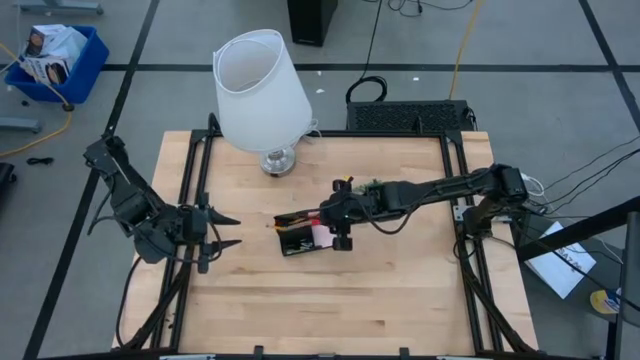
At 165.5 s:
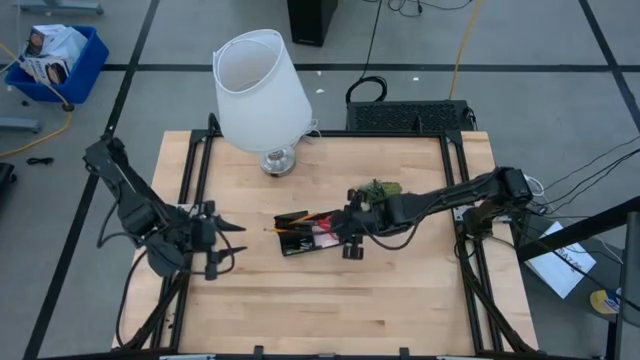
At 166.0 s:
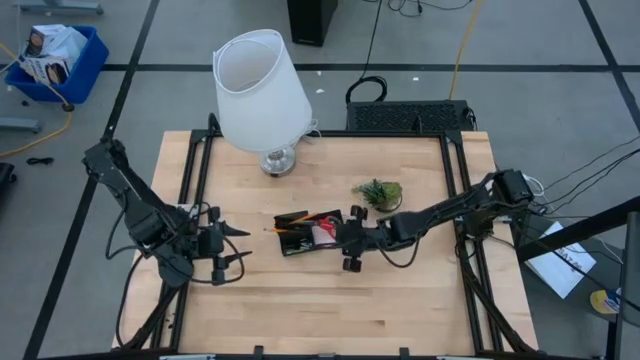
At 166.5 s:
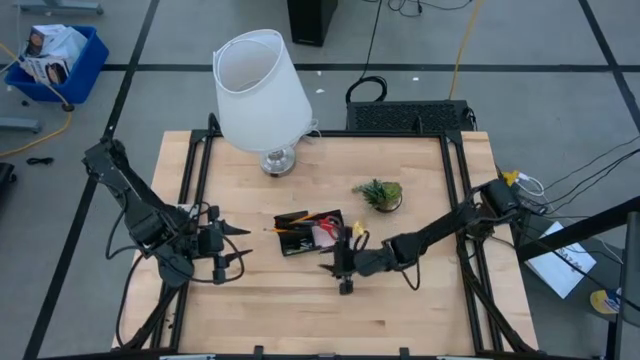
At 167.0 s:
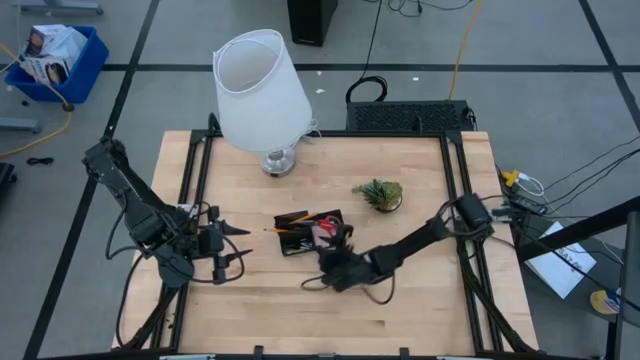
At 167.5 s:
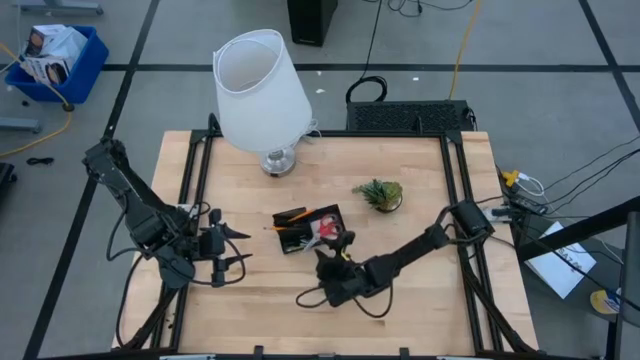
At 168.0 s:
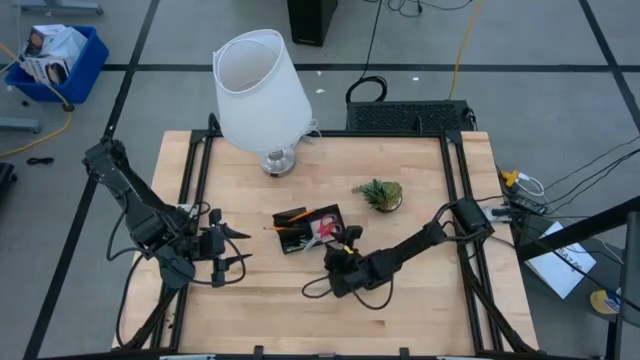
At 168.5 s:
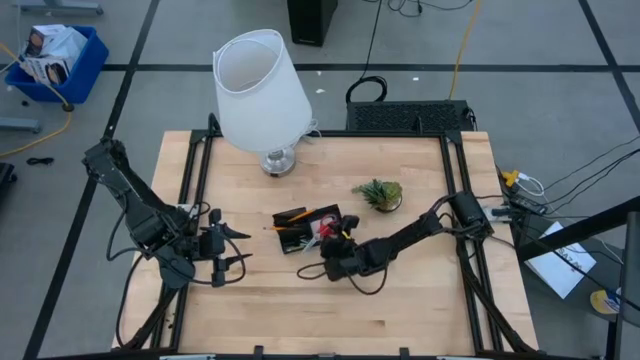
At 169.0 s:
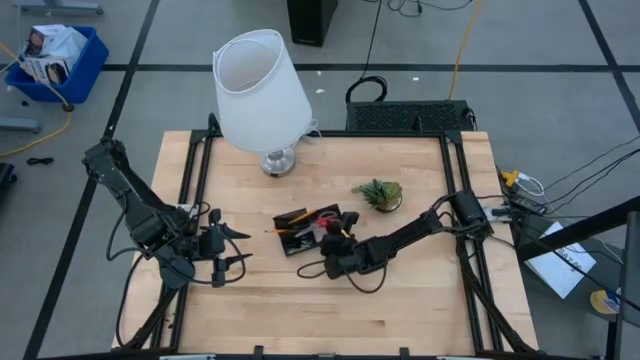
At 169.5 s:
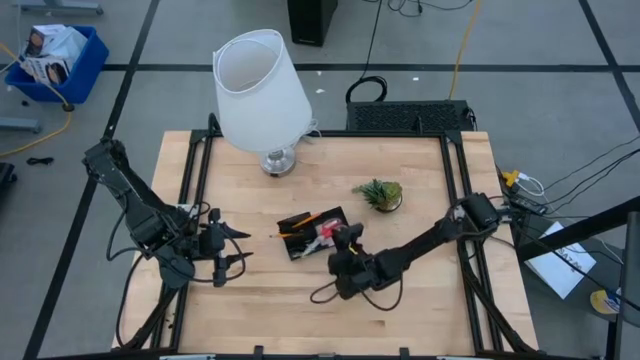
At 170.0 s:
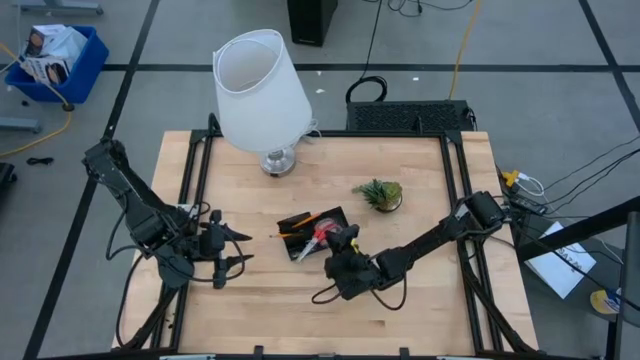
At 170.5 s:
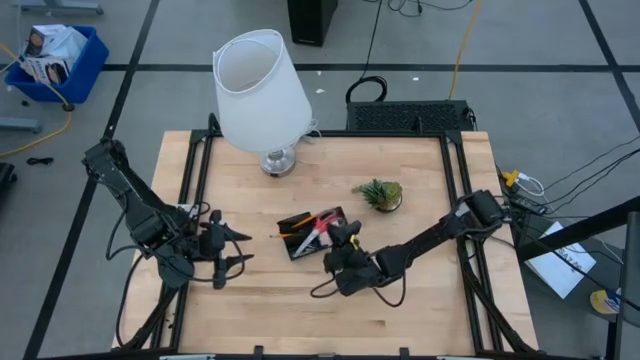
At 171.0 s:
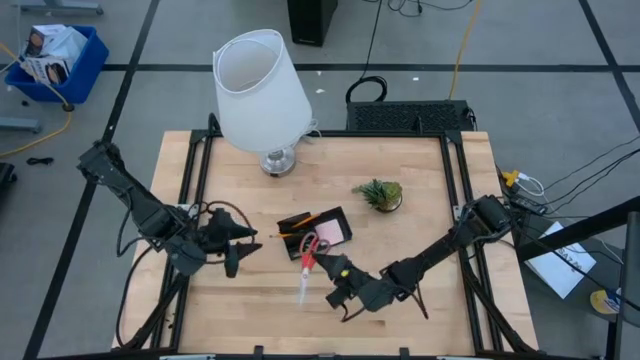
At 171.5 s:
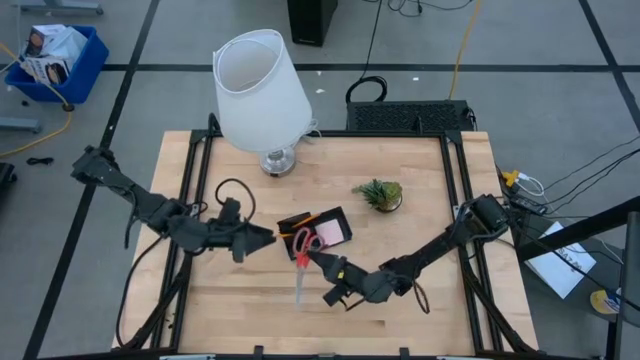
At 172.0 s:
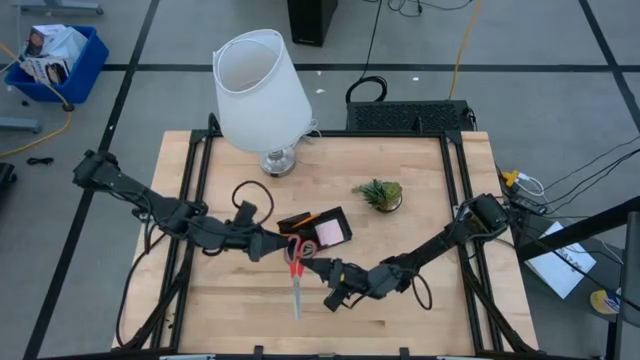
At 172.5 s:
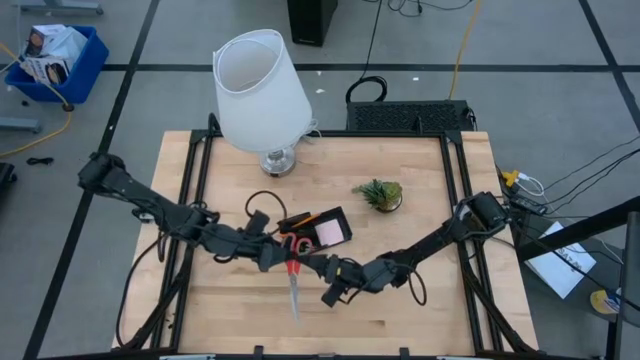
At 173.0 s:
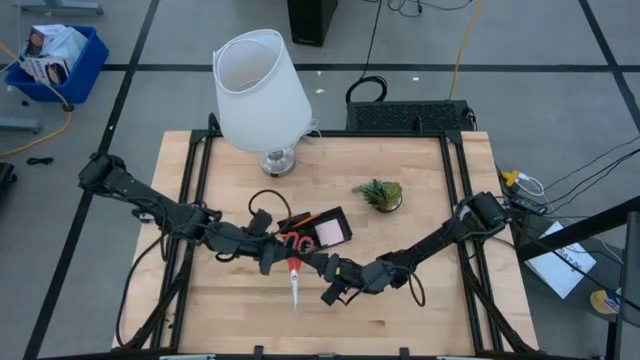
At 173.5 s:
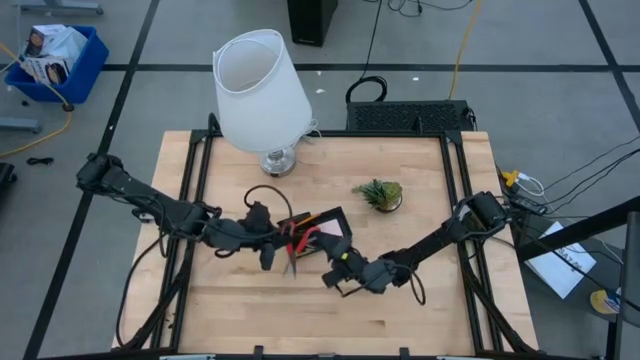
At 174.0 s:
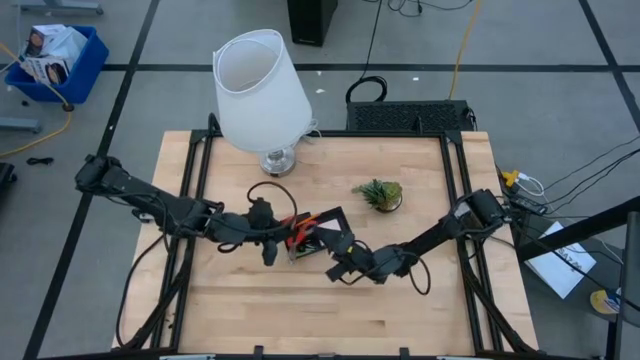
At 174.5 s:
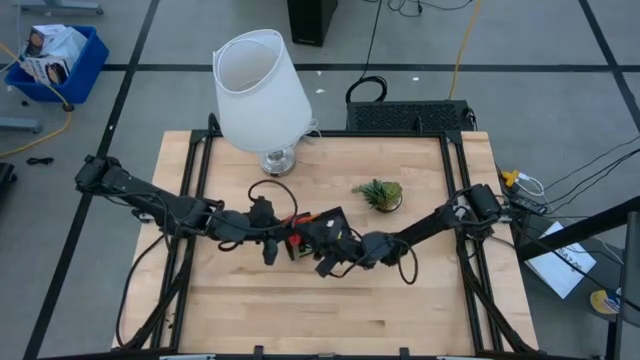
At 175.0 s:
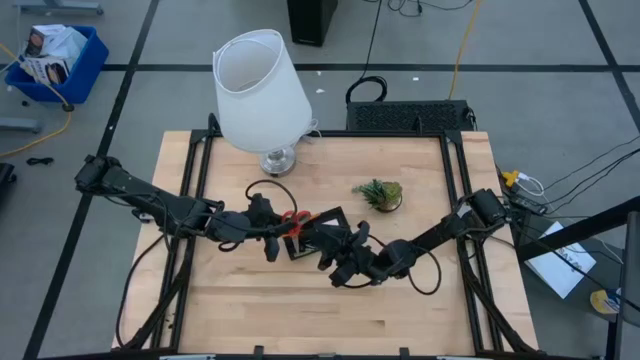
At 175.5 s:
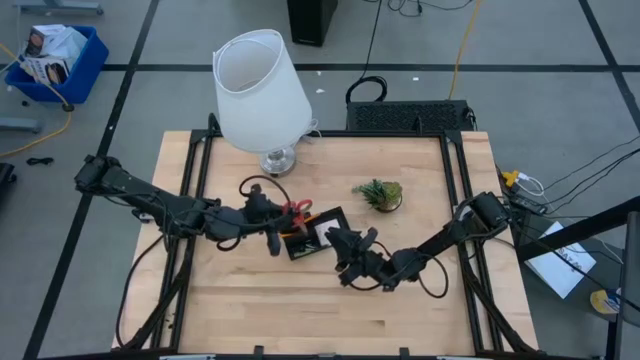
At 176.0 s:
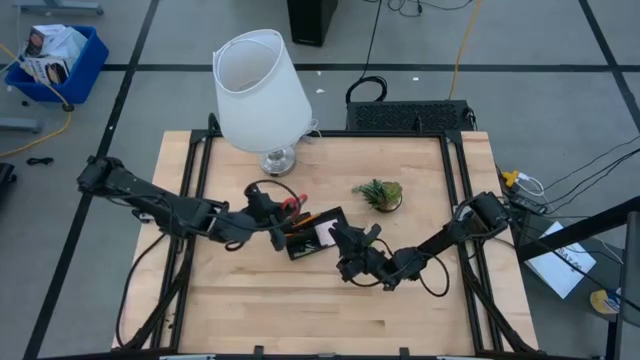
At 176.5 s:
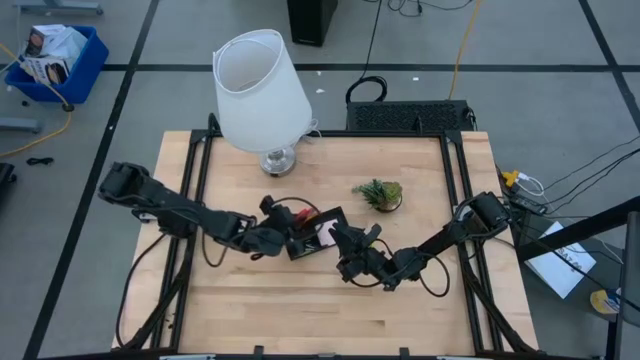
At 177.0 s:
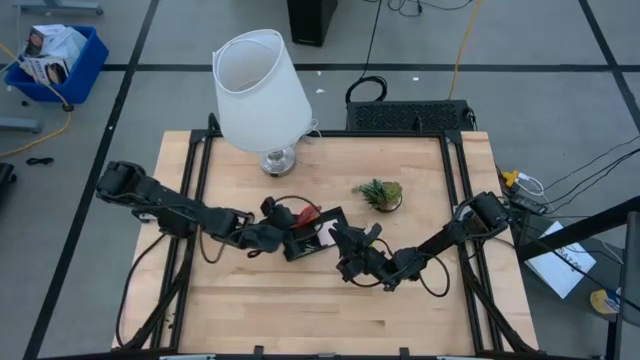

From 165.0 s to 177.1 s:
Task: Pick and place office supplies into organizer
Put the orange scissor into the black desk organizer

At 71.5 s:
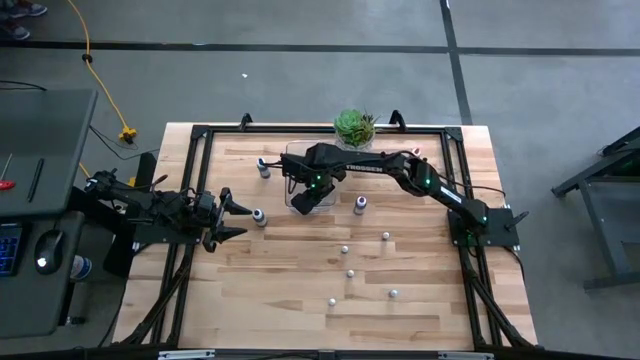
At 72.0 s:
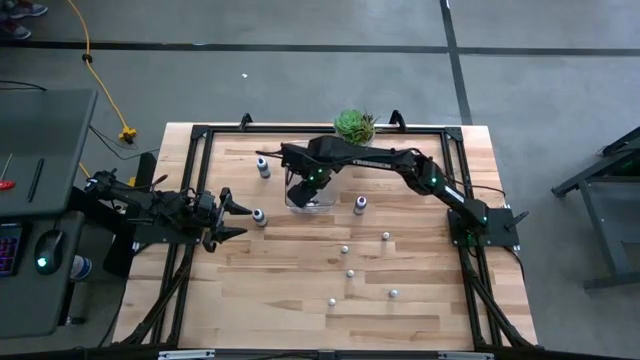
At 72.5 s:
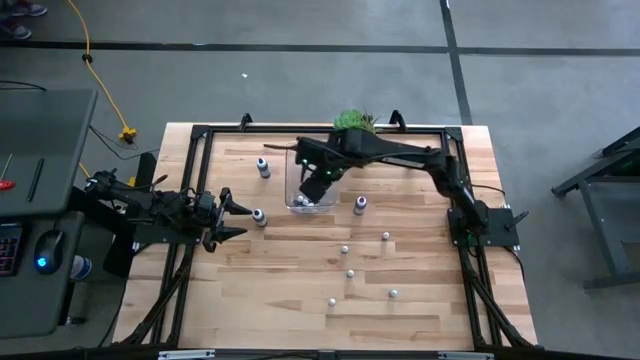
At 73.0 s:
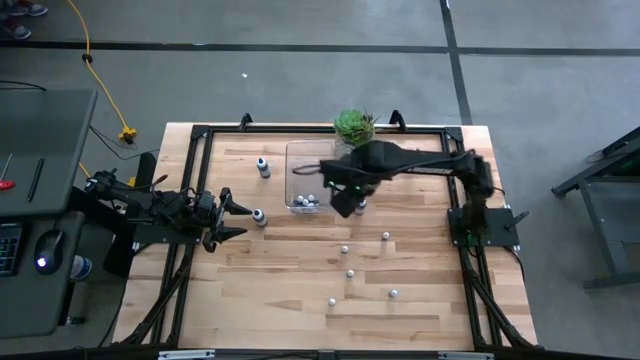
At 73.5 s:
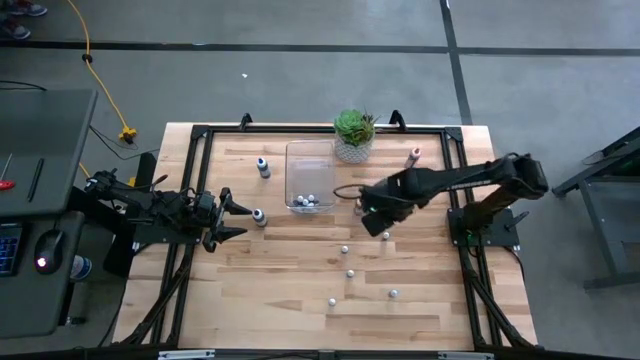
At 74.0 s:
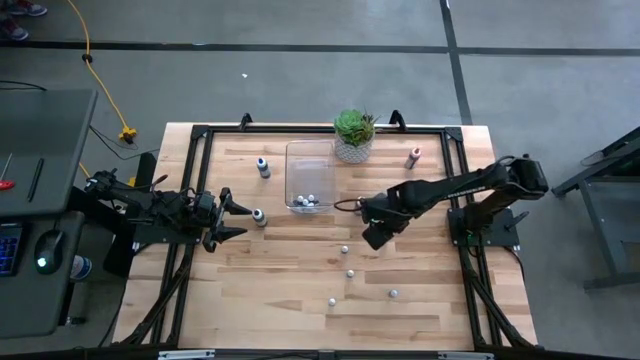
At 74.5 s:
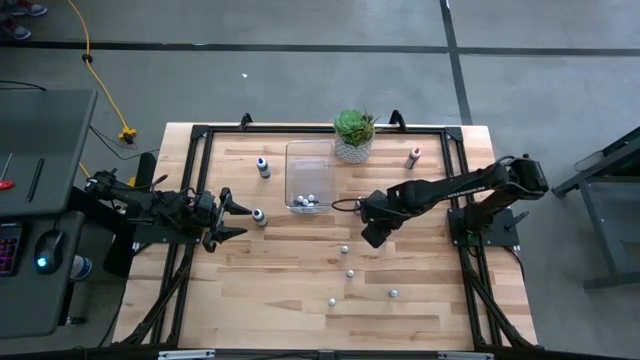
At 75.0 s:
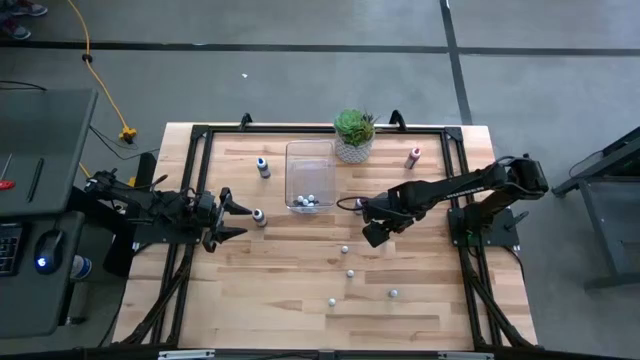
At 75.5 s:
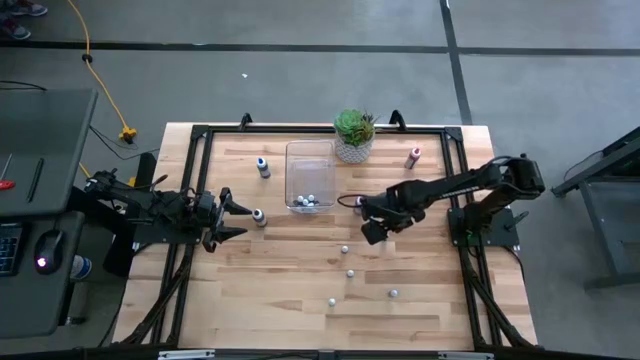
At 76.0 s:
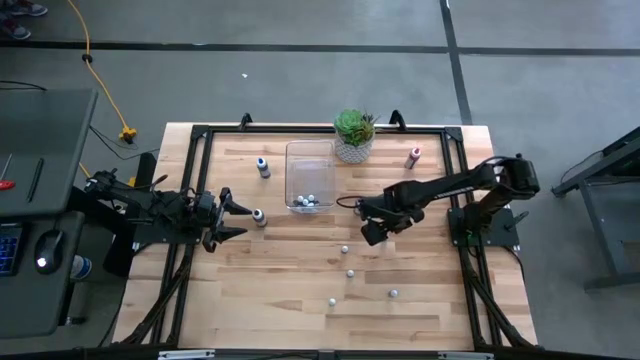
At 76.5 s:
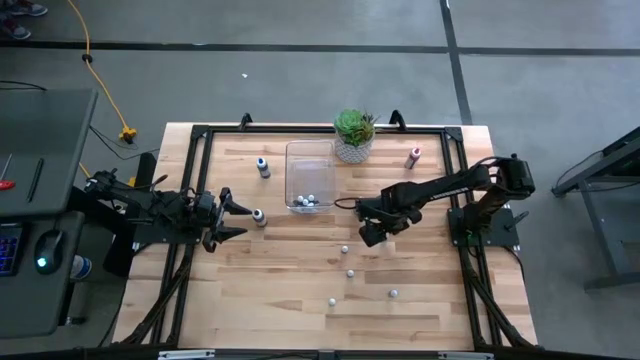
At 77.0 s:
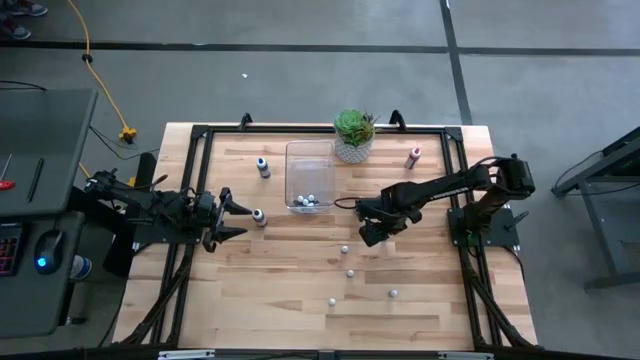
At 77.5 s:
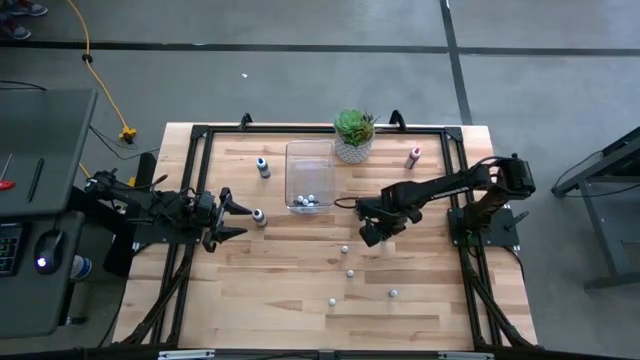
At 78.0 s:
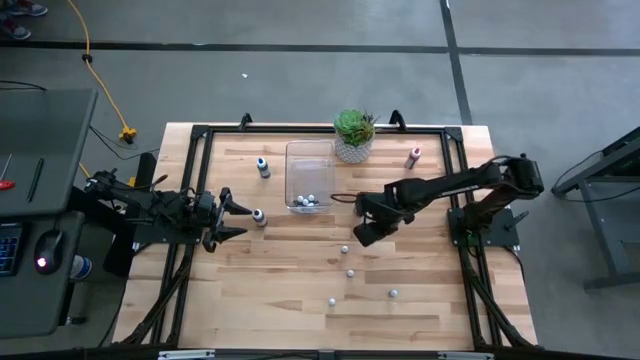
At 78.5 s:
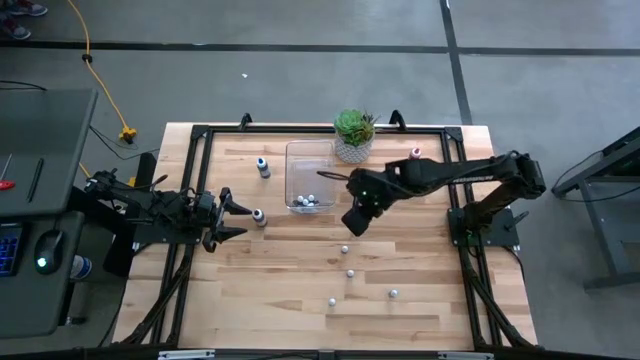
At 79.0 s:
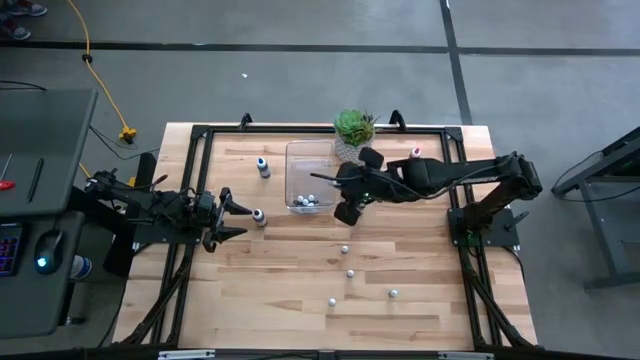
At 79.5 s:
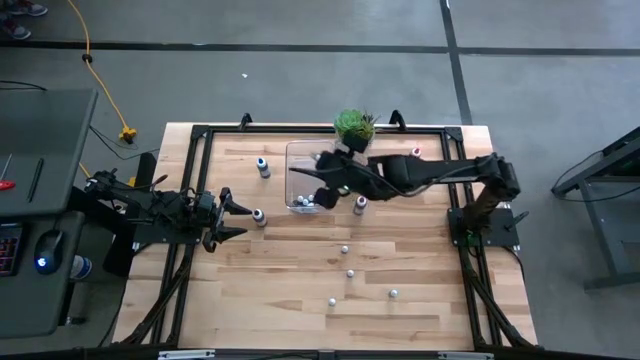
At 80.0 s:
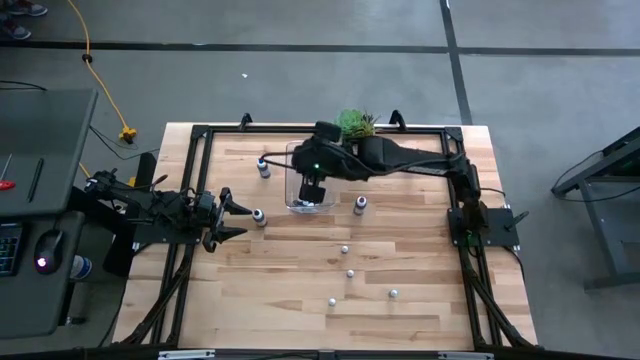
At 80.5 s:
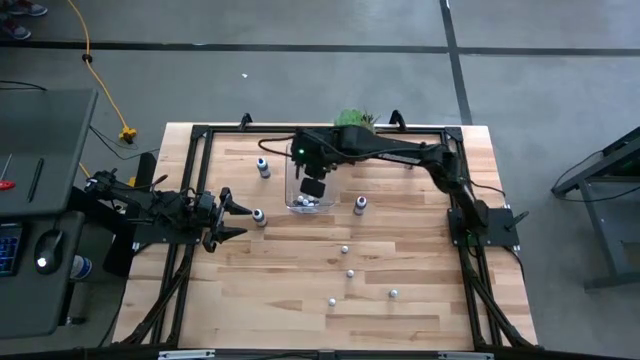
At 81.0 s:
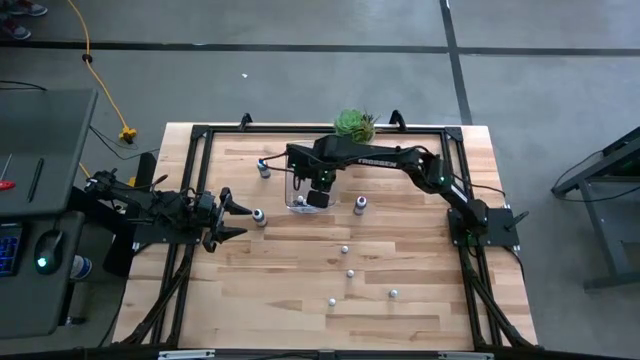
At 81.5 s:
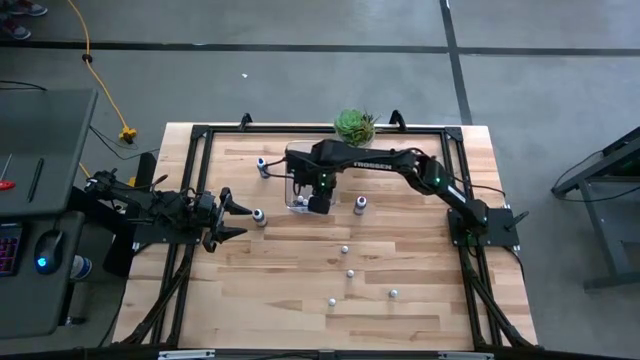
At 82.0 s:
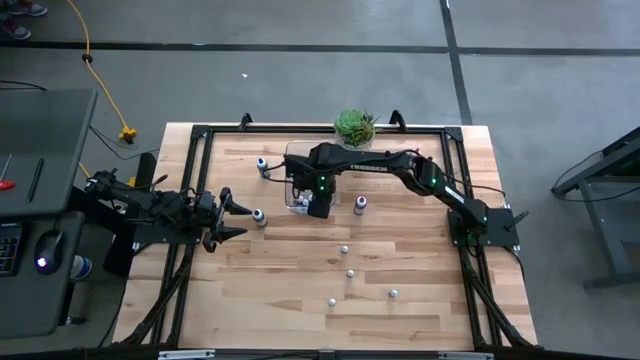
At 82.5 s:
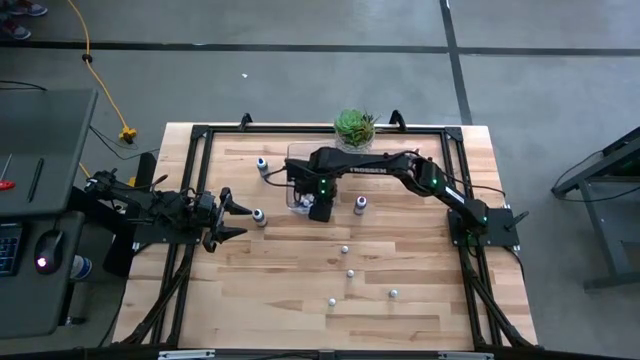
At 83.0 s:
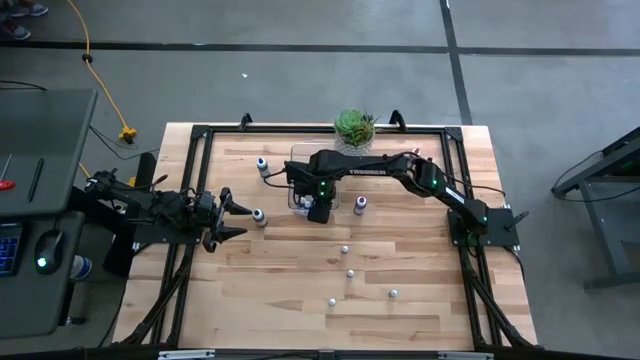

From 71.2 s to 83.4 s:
Task: Pick & Place food coloring
Put the small green food coloring bottle into the transparent bin
